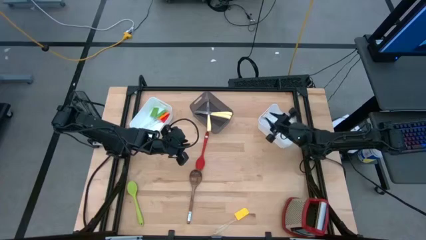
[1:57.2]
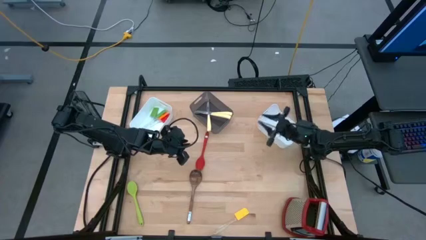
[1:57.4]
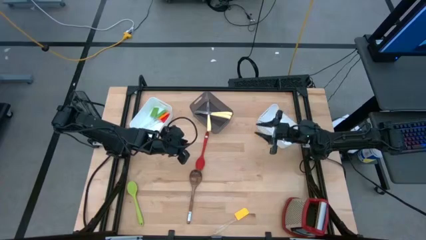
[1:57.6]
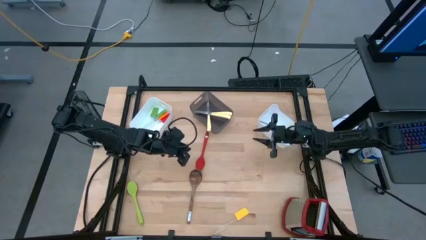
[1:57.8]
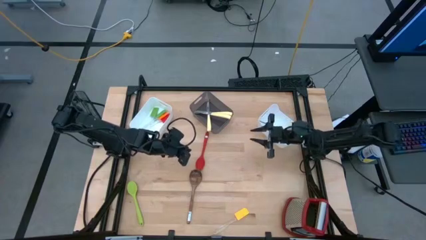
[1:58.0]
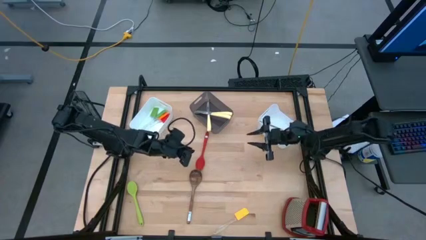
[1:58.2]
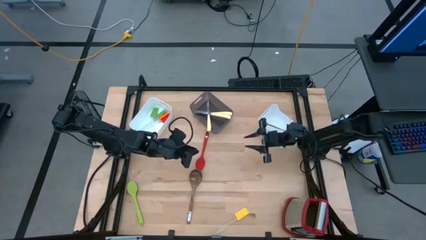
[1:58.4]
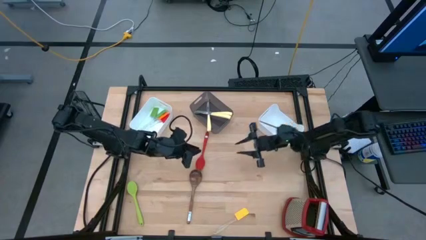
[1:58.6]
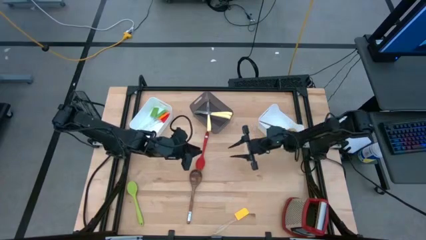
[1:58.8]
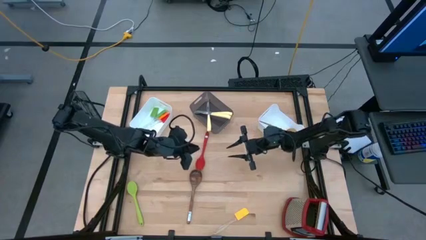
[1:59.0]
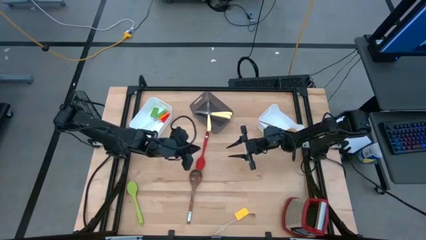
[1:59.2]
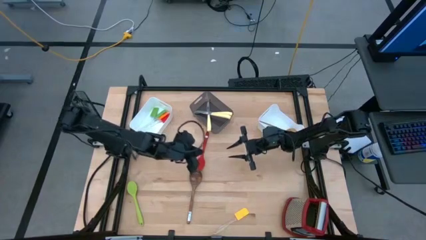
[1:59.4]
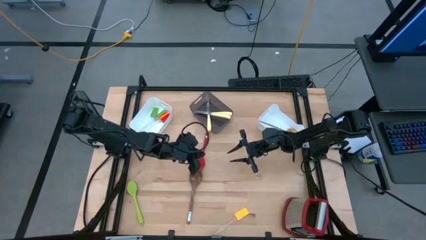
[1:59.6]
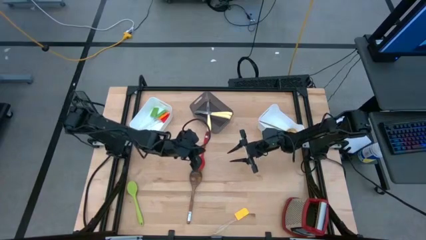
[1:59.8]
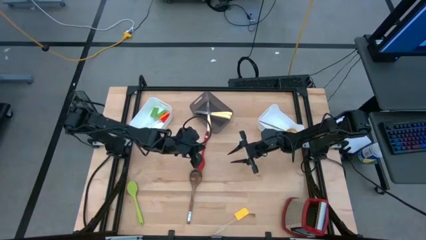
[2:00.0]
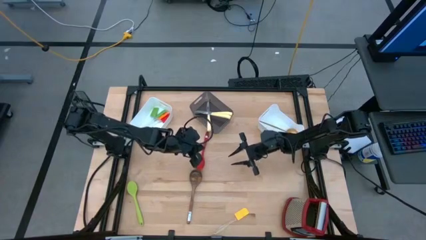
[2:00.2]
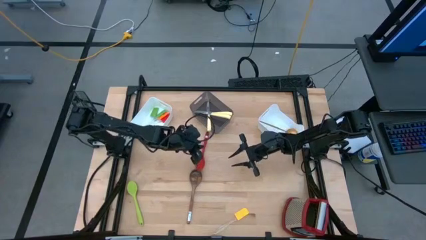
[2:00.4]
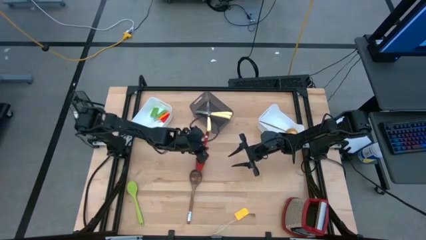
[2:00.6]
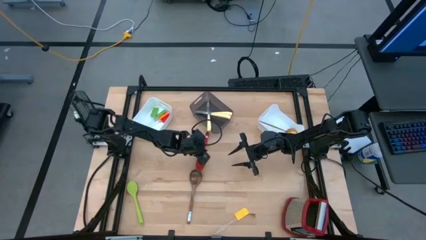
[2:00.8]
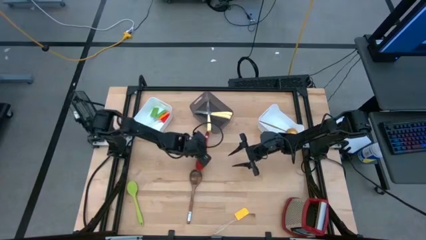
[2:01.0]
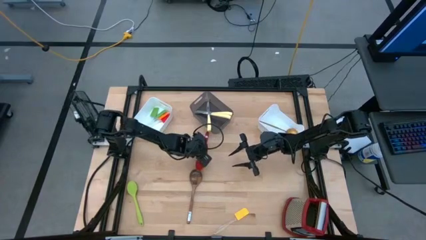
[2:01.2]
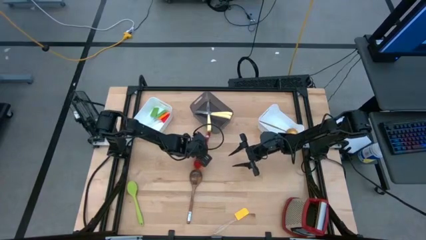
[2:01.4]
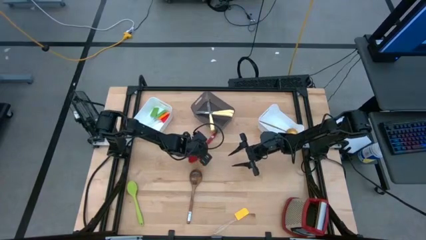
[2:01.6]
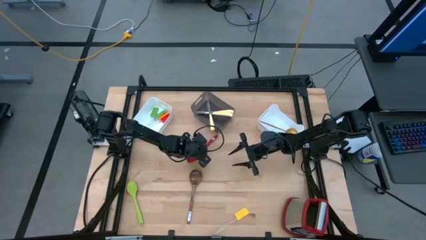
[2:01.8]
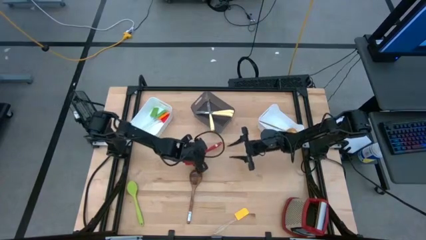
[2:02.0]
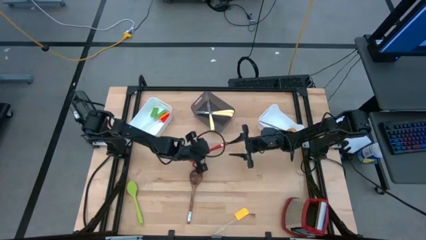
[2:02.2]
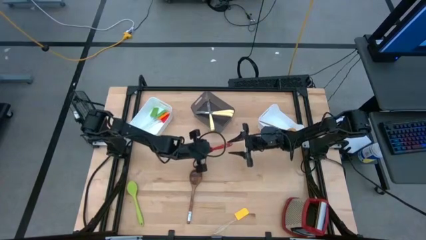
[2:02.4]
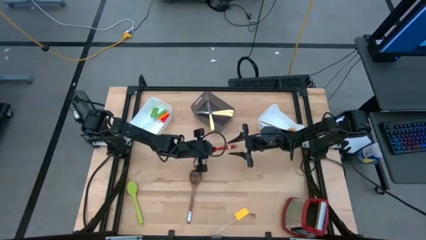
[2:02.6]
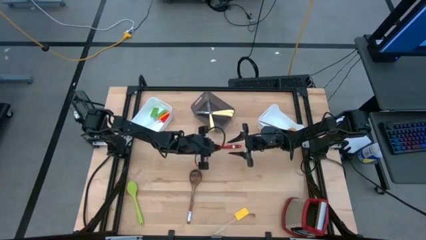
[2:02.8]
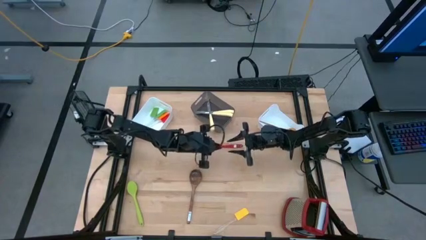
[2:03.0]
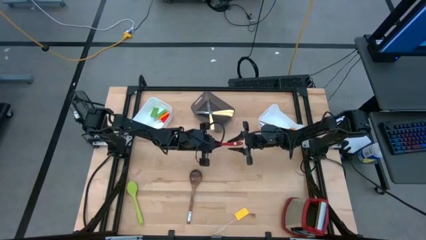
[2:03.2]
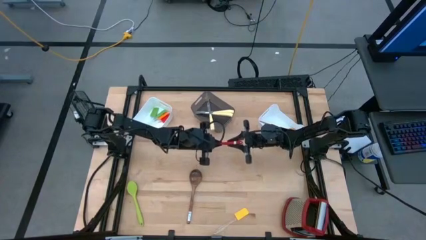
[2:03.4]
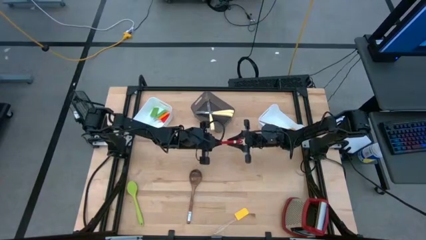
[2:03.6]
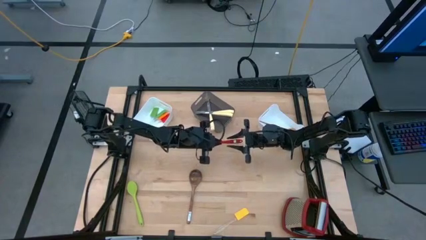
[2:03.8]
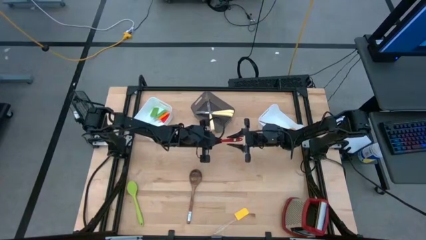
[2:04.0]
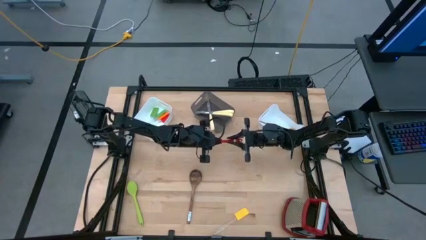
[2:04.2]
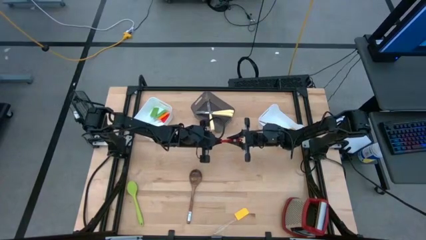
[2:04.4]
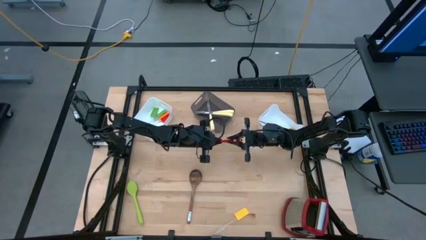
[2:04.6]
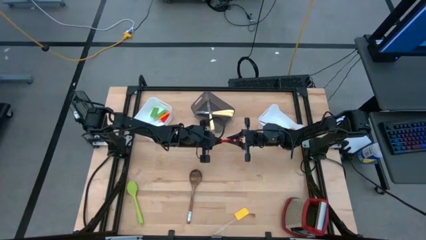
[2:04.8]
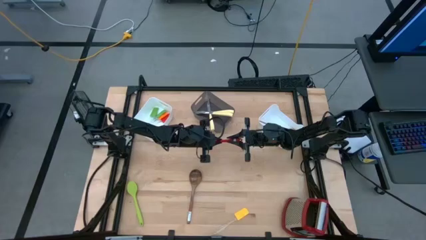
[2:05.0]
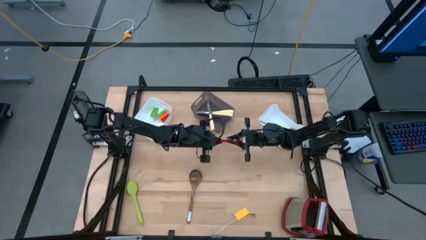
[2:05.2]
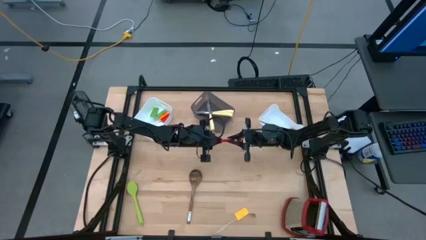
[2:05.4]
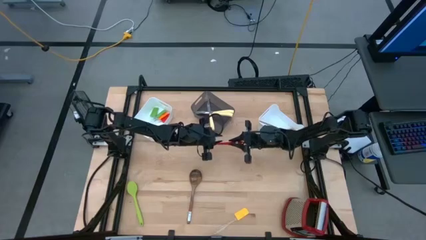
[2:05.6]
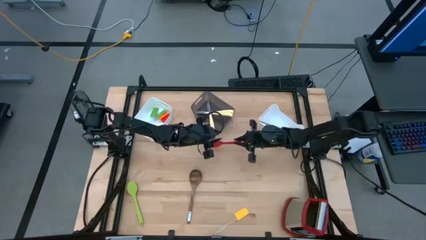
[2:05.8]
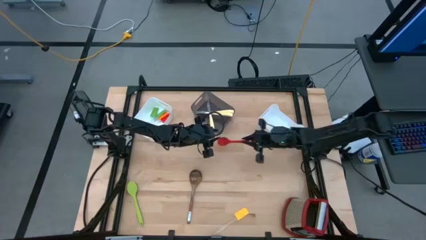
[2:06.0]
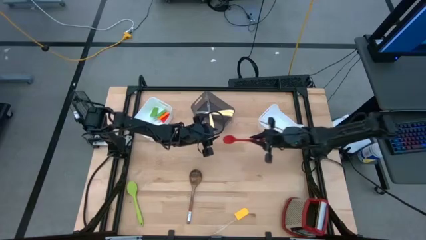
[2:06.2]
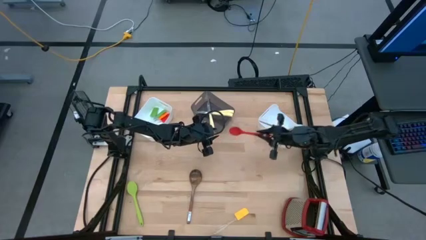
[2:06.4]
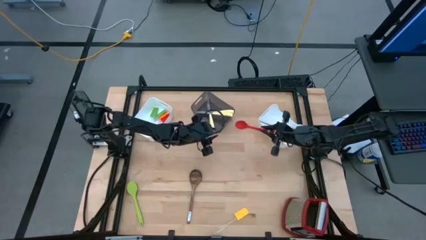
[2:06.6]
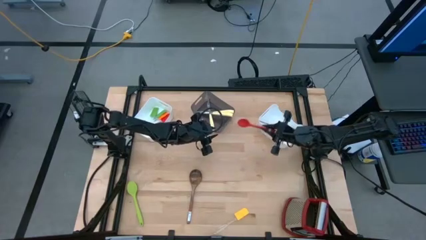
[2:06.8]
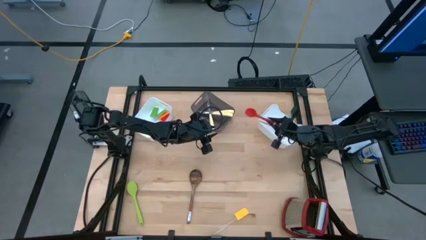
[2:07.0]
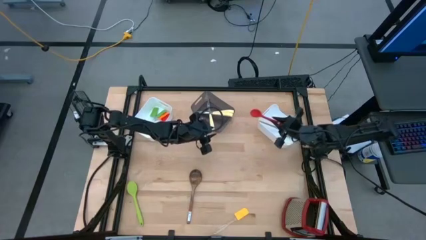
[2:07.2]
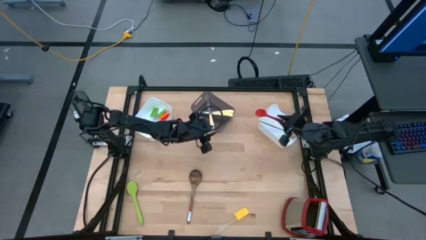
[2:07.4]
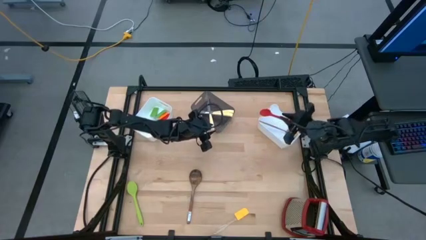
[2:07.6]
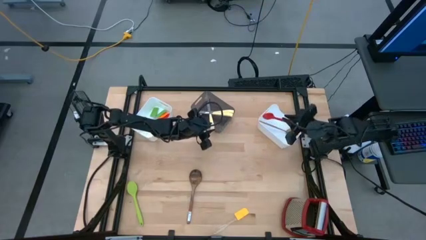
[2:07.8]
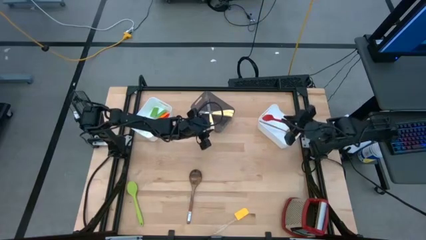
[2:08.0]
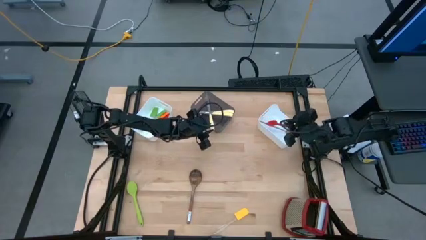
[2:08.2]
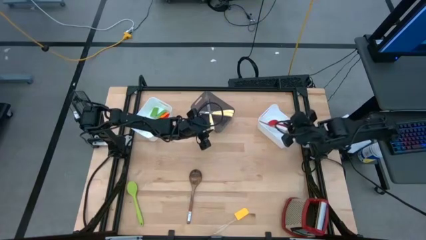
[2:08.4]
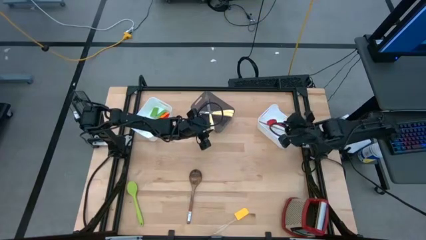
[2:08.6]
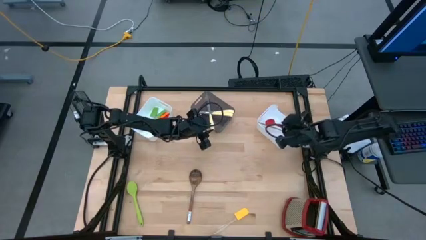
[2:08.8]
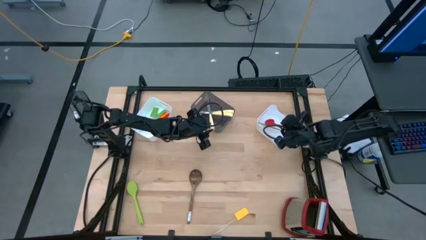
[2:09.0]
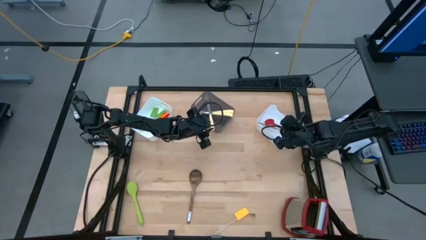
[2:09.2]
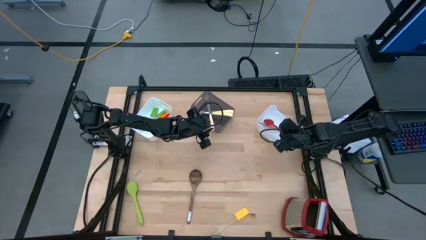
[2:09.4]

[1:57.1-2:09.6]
Task: Pick & Place Kitchen Items
Put the red serving spoon into the right white bin

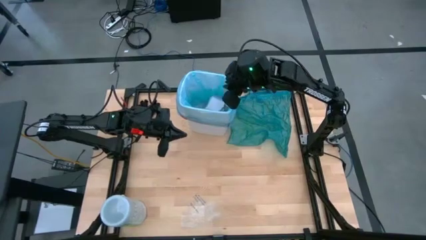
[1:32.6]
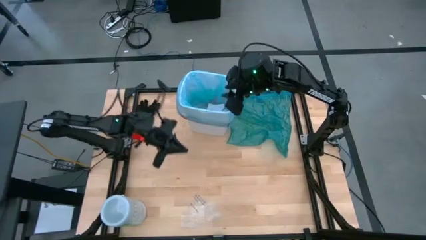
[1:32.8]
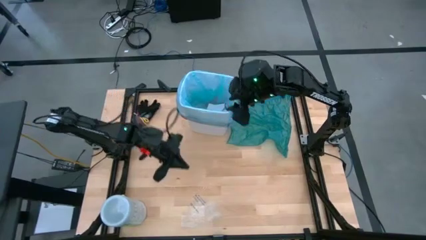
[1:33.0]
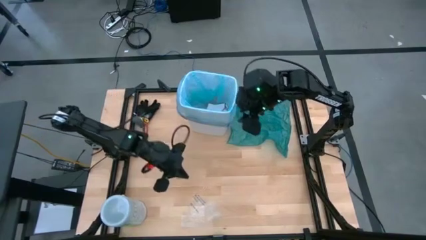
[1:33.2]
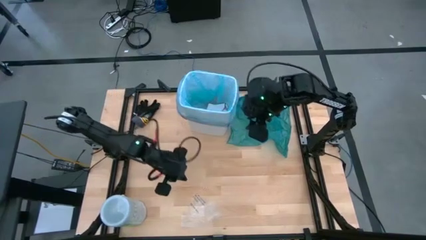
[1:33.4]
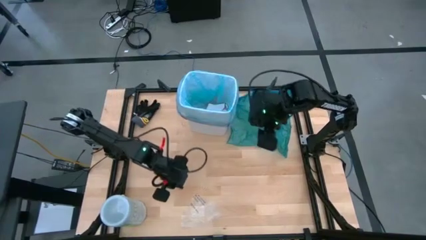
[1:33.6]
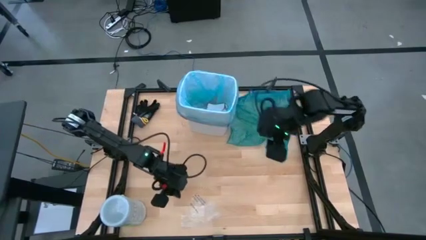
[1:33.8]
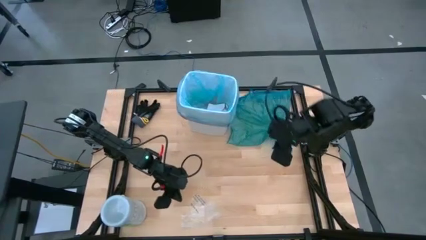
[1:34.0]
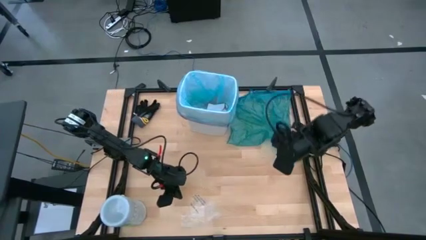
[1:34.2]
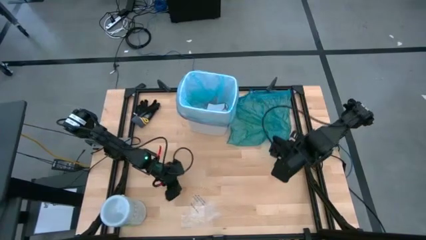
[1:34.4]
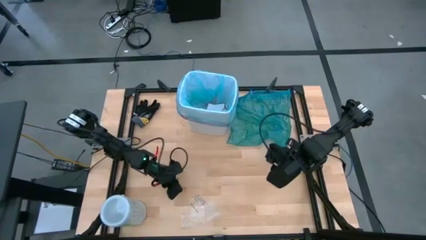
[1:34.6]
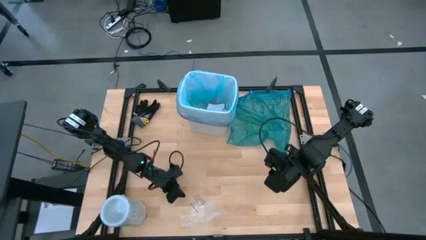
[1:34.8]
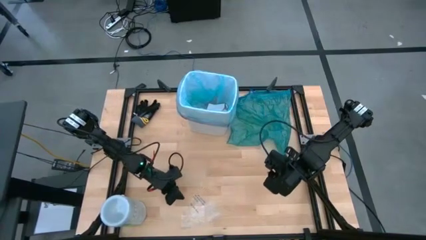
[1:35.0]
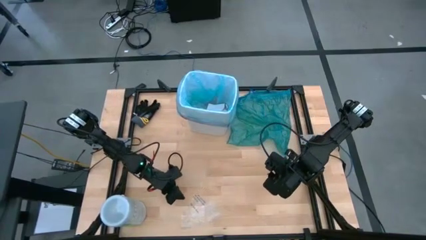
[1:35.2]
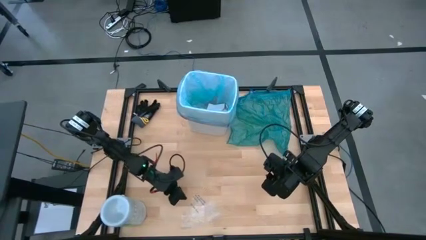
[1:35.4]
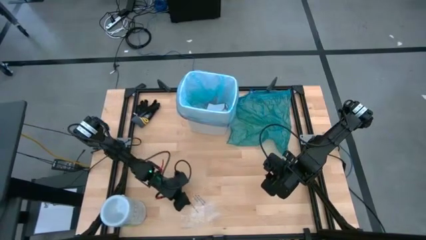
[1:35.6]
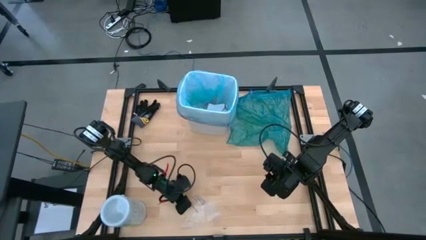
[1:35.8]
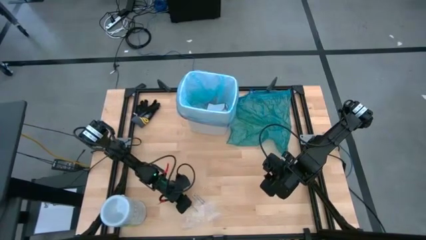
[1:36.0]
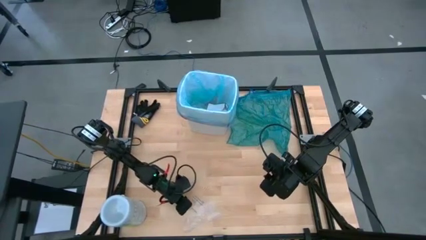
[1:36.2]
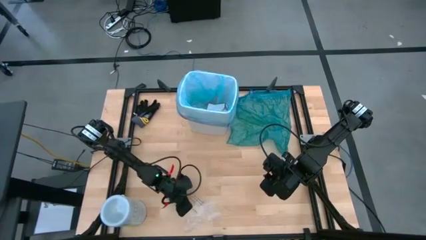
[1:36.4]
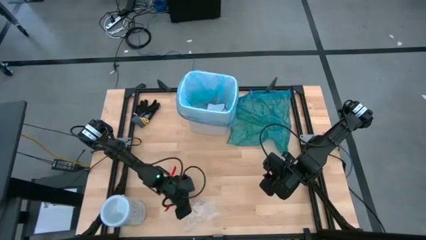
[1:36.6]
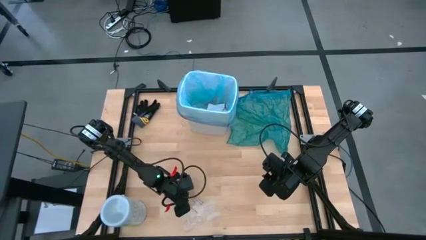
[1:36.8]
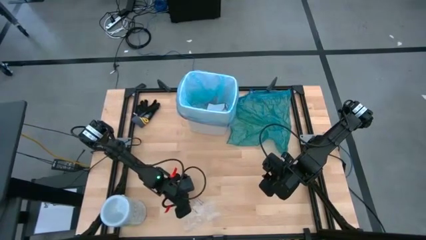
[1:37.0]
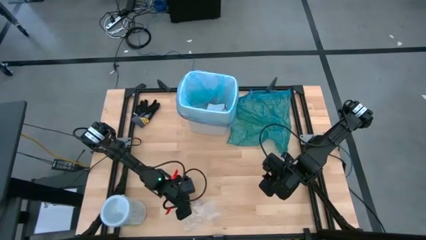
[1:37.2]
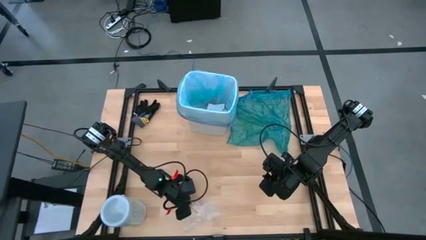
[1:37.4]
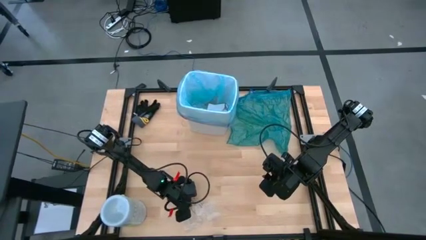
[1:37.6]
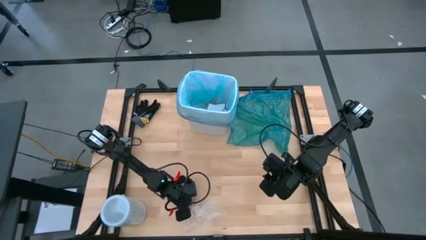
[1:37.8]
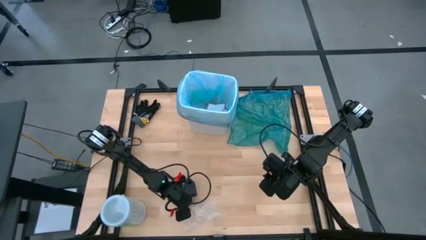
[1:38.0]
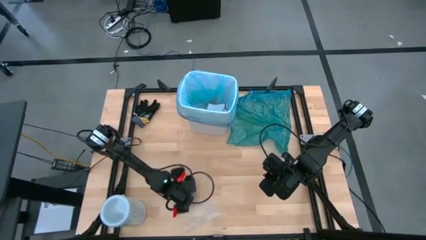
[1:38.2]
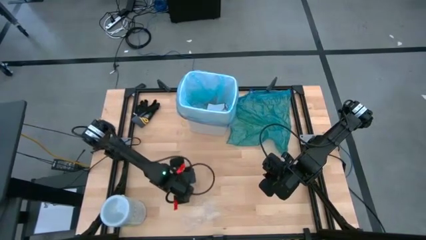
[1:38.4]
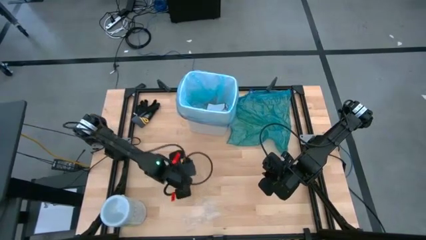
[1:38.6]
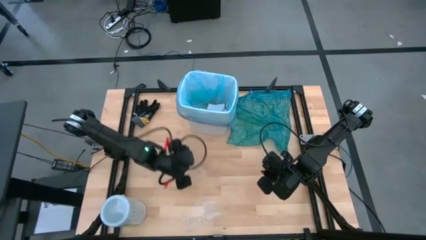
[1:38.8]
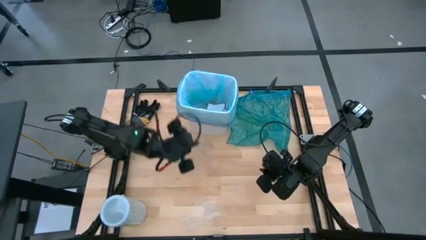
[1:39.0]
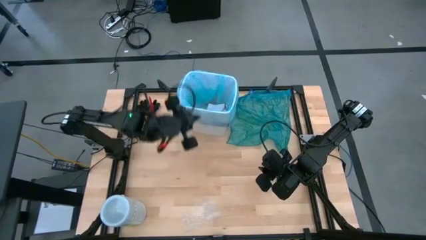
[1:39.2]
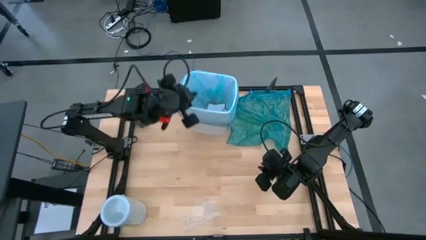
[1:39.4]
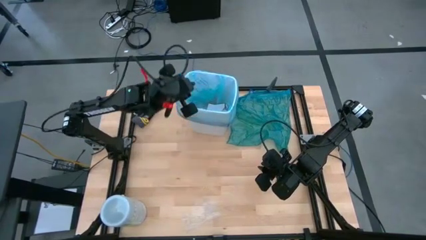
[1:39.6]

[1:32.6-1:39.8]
Task: place trash/remove bag and relplace
Put the transparent plastic into the trash bin
